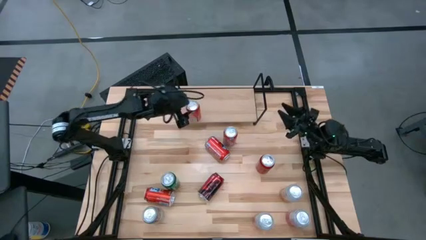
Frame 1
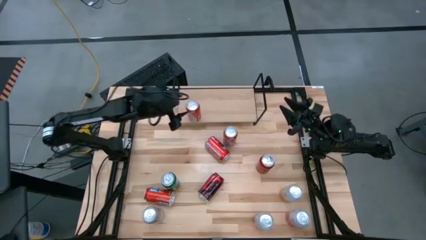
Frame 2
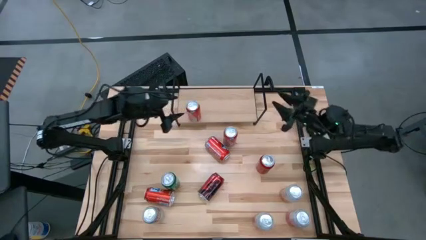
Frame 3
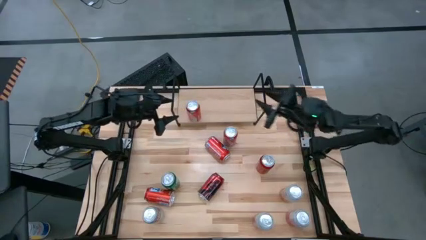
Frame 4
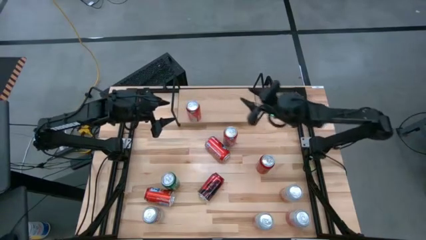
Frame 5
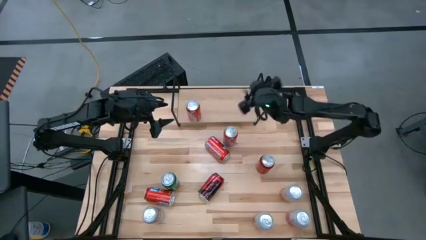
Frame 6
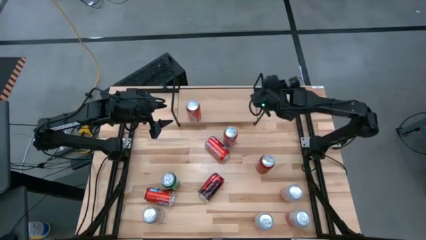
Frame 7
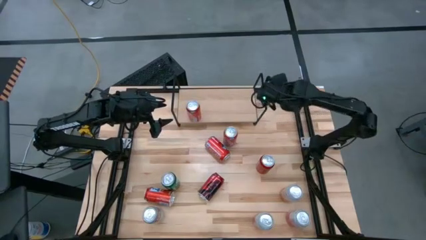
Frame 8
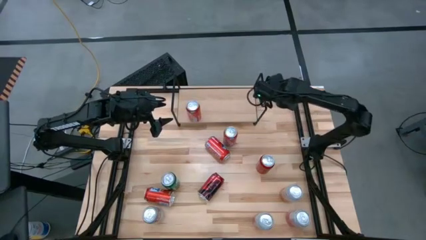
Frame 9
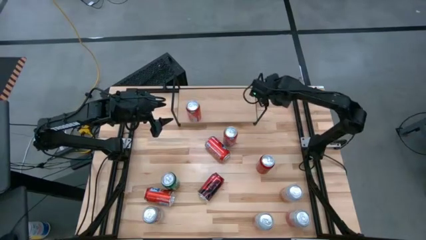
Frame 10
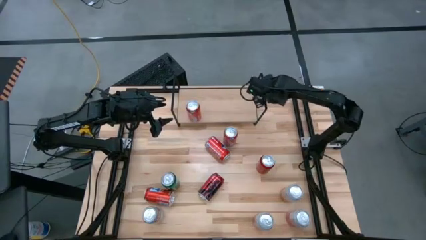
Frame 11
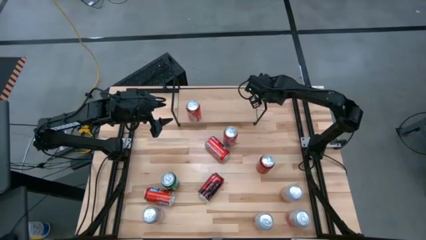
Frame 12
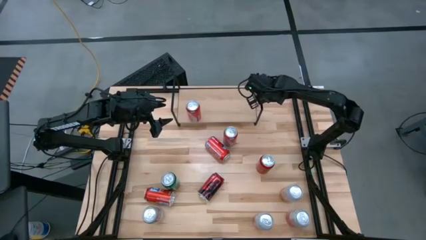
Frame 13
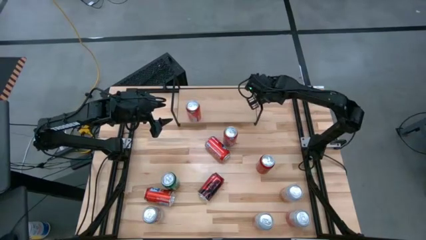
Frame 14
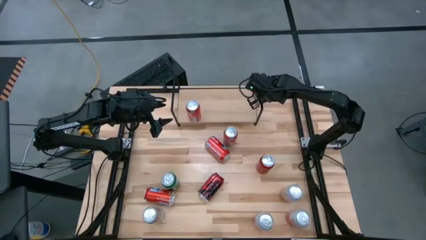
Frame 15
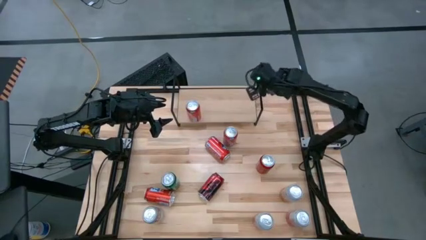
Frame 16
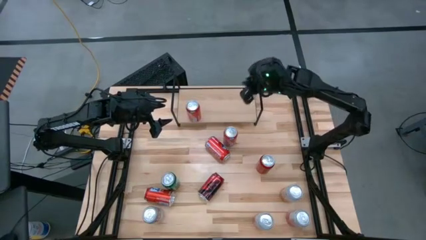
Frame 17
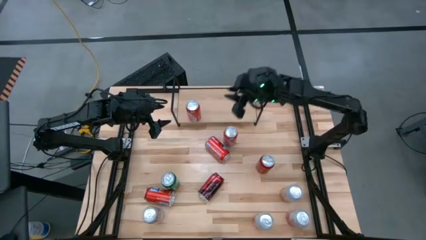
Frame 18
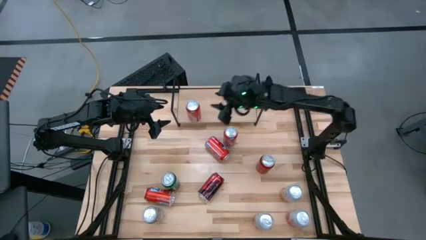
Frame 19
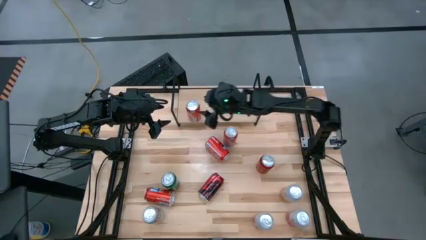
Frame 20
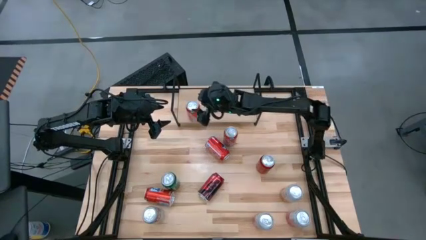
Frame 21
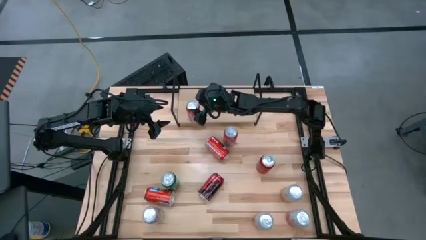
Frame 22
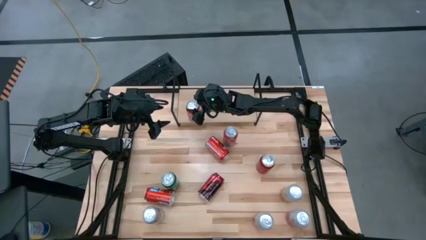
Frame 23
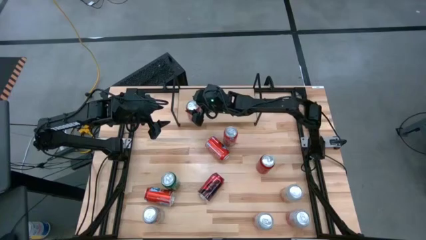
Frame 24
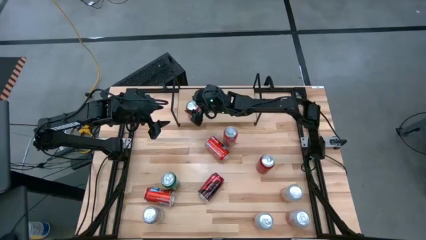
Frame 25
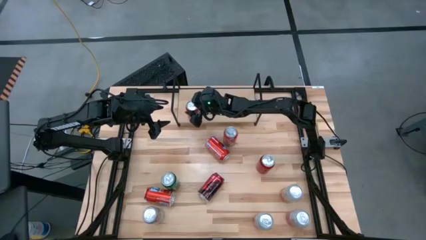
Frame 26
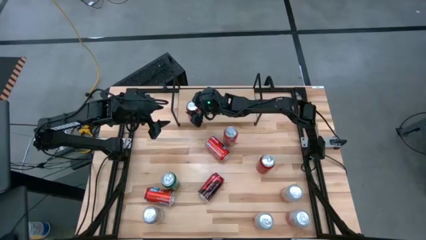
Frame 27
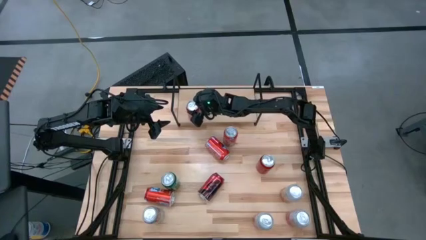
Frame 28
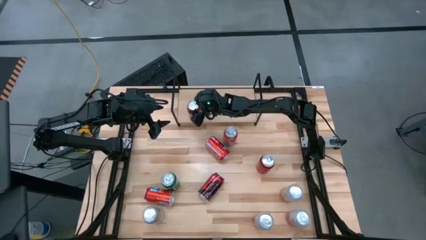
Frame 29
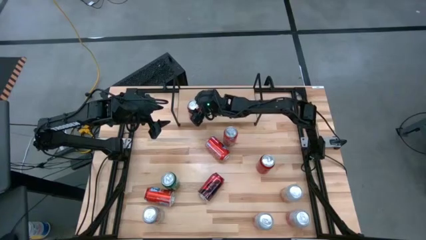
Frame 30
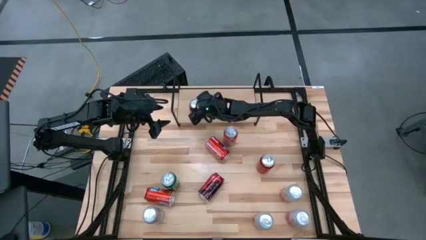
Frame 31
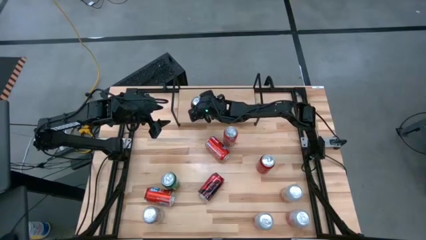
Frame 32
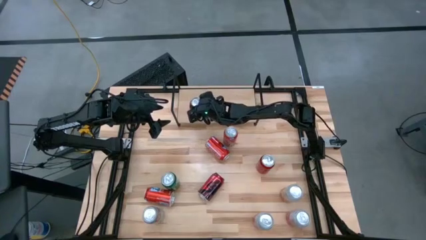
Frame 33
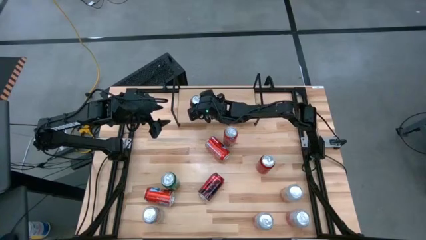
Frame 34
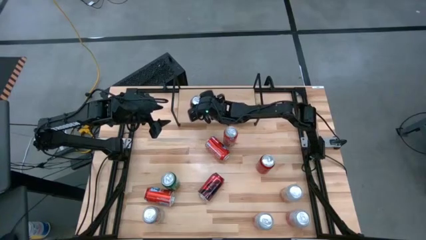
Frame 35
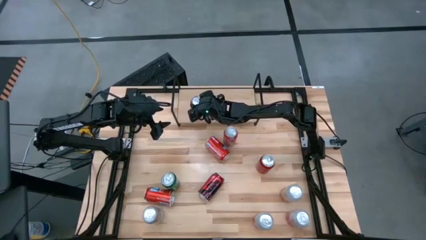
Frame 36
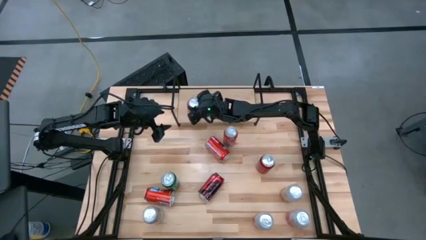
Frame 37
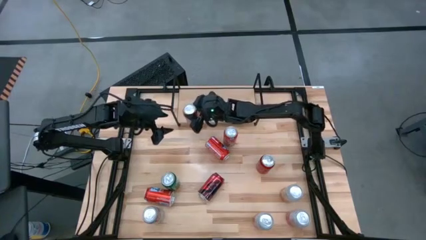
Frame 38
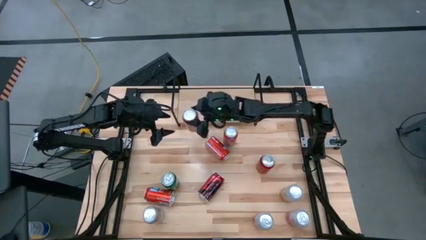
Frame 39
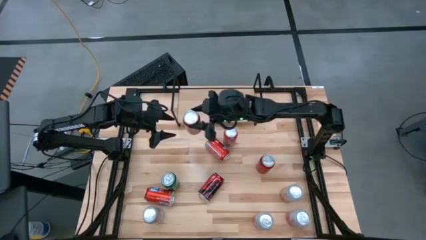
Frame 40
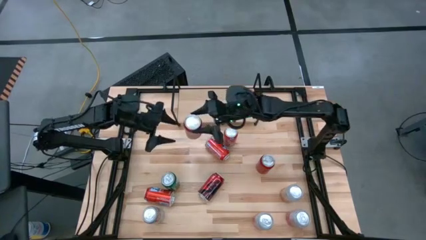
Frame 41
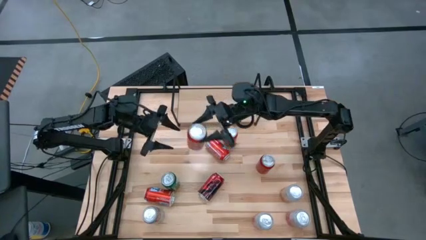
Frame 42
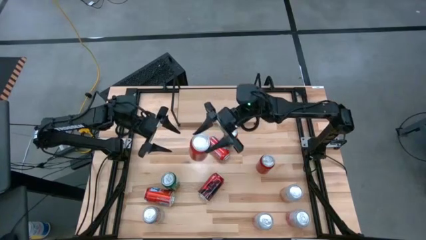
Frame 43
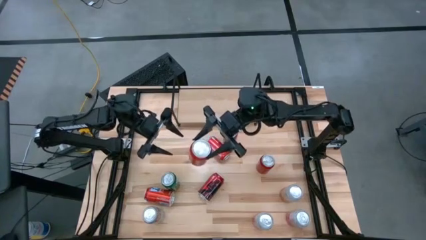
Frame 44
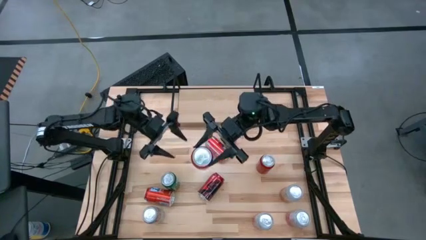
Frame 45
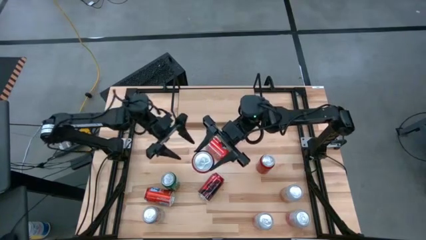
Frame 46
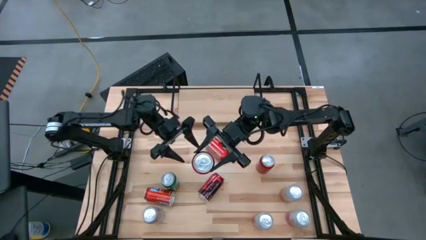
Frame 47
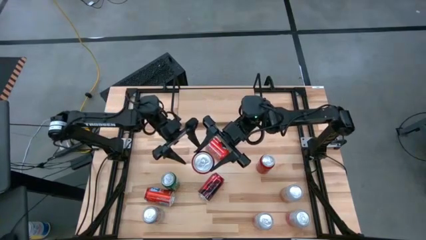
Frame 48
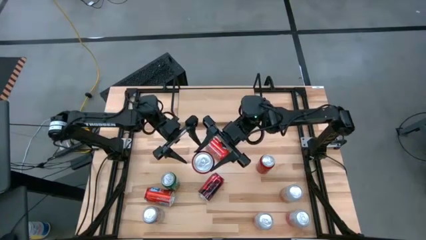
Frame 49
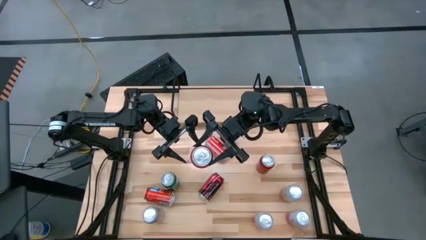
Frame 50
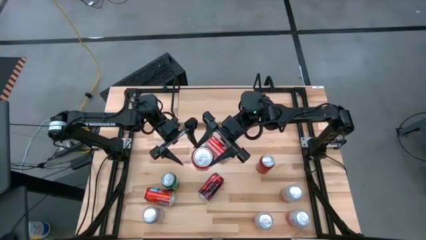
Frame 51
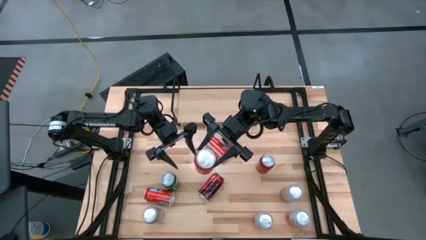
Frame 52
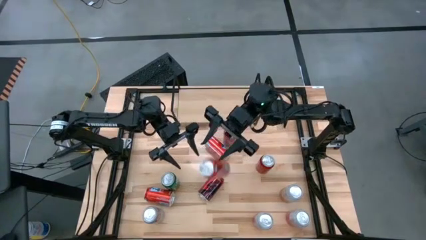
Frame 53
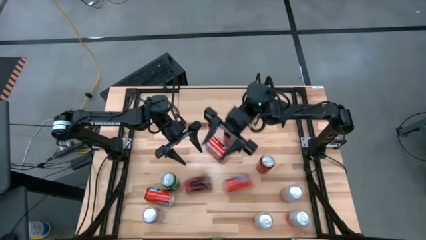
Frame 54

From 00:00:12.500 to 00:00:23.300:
Task: Place canned beverage on shelf
Put the red soda can on the shelf
